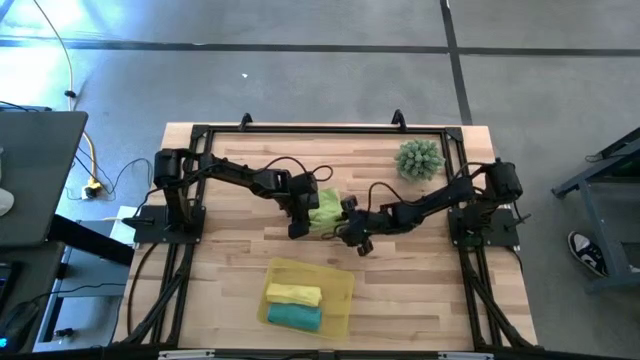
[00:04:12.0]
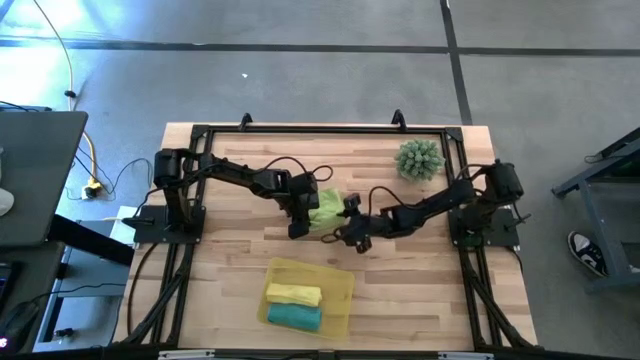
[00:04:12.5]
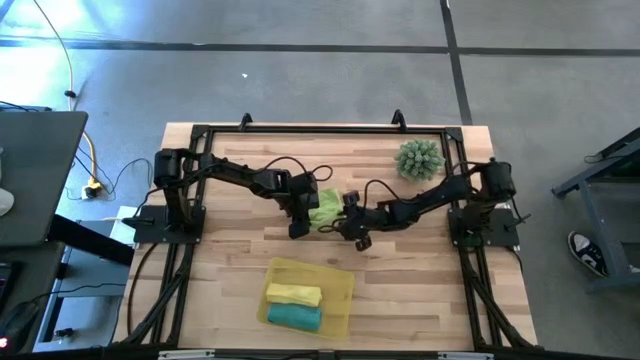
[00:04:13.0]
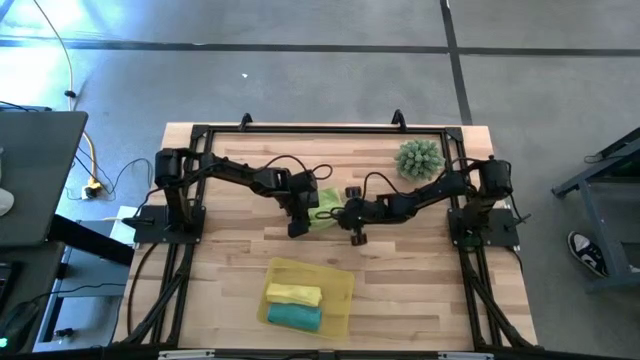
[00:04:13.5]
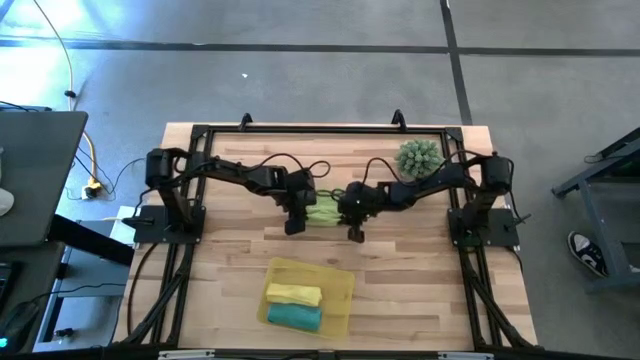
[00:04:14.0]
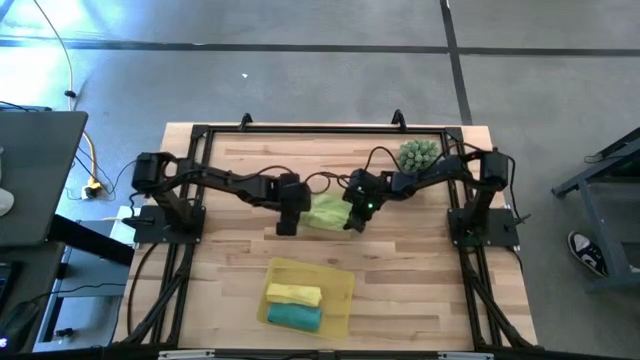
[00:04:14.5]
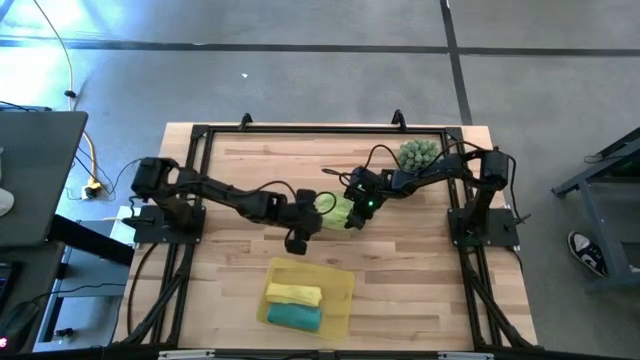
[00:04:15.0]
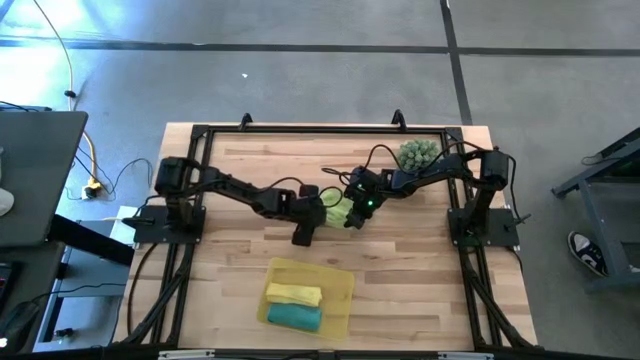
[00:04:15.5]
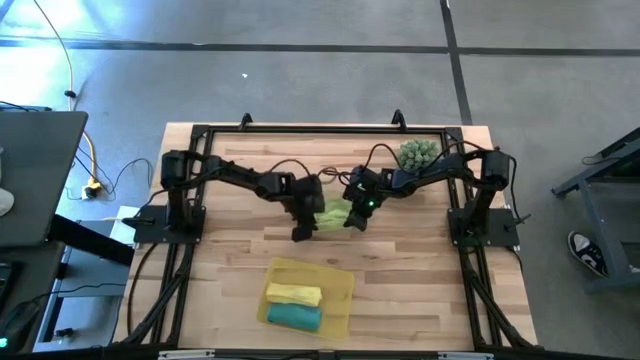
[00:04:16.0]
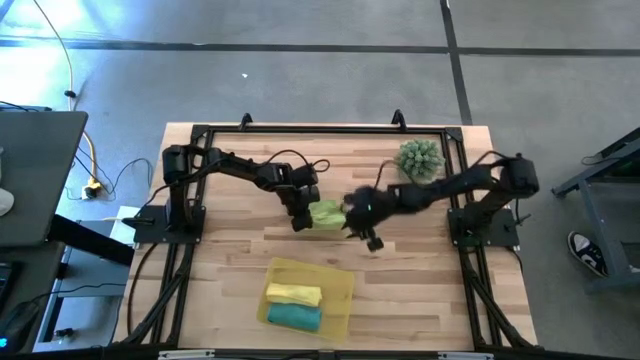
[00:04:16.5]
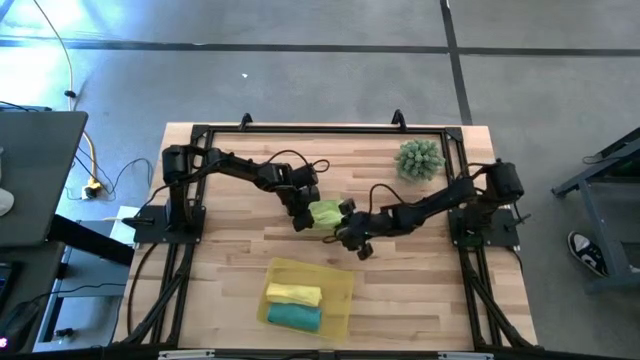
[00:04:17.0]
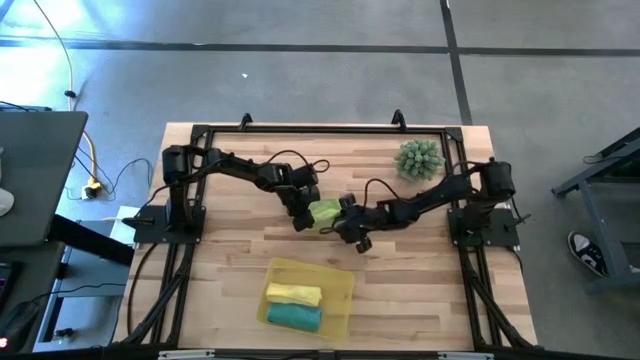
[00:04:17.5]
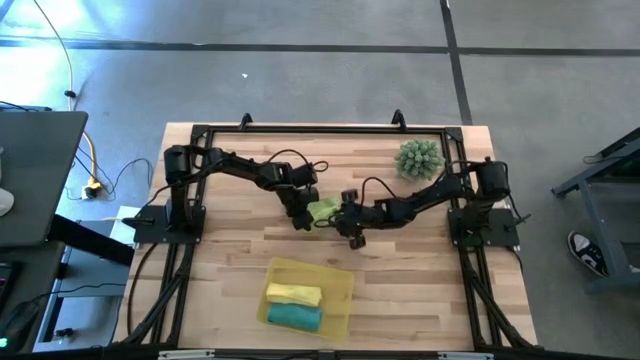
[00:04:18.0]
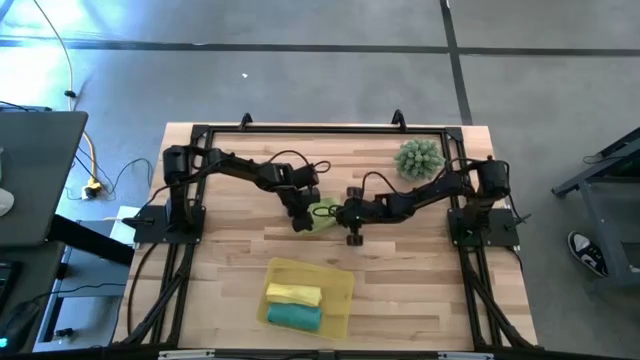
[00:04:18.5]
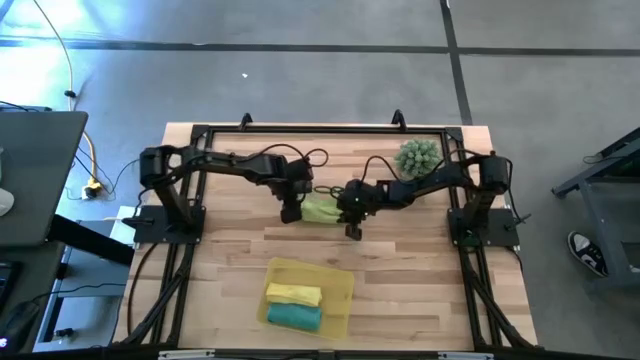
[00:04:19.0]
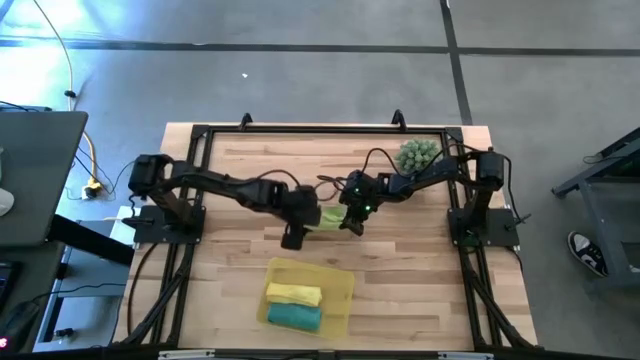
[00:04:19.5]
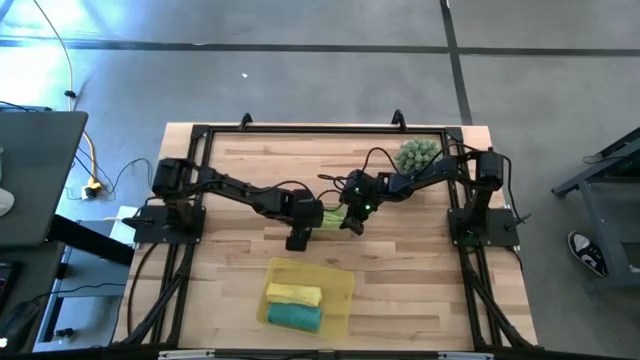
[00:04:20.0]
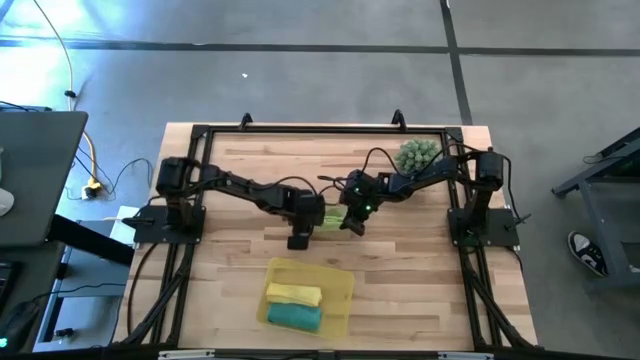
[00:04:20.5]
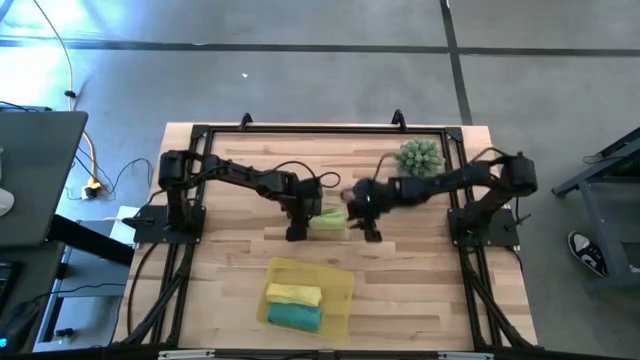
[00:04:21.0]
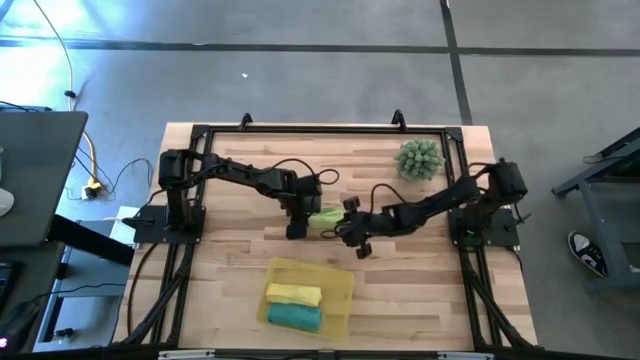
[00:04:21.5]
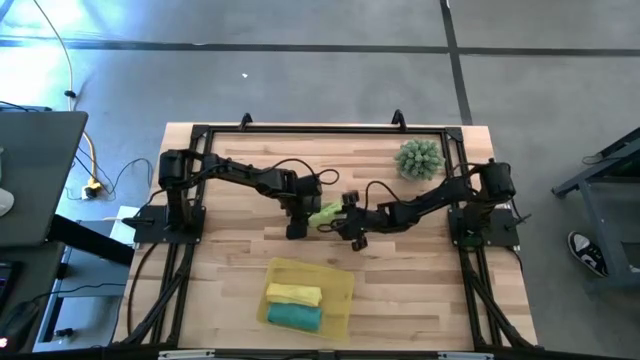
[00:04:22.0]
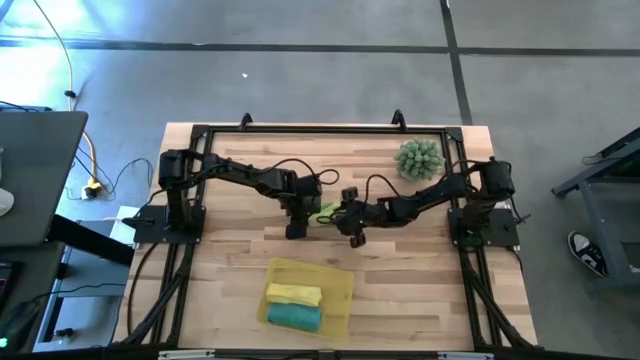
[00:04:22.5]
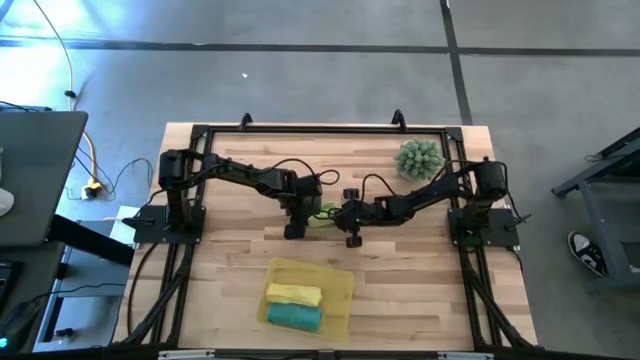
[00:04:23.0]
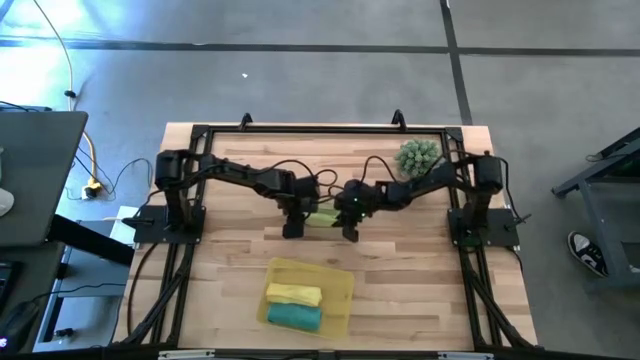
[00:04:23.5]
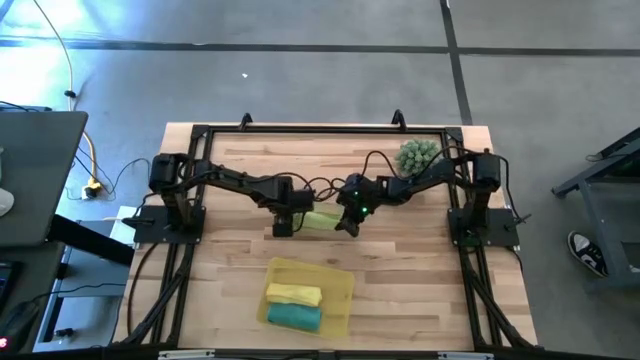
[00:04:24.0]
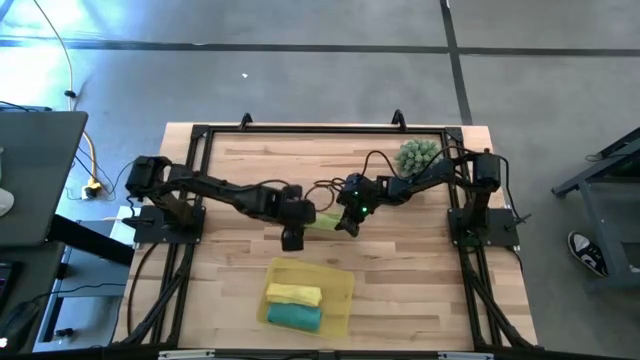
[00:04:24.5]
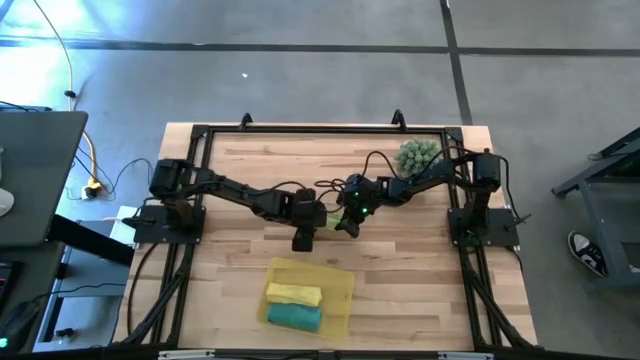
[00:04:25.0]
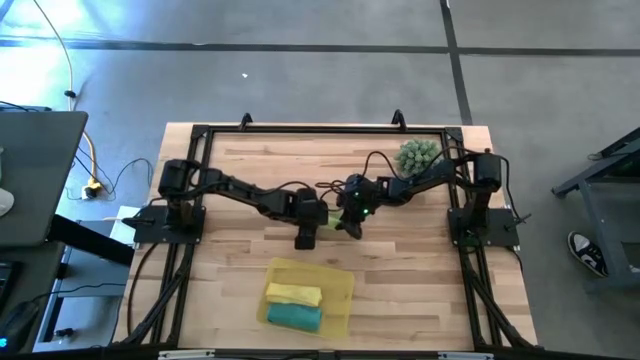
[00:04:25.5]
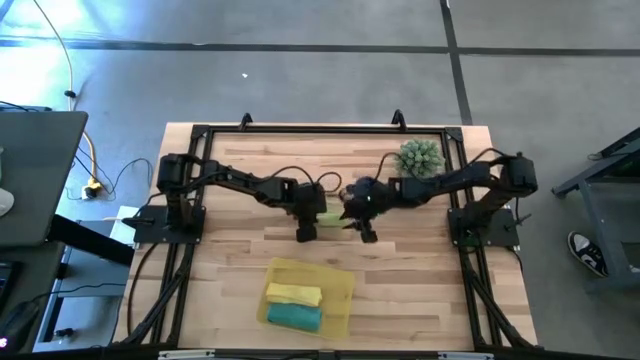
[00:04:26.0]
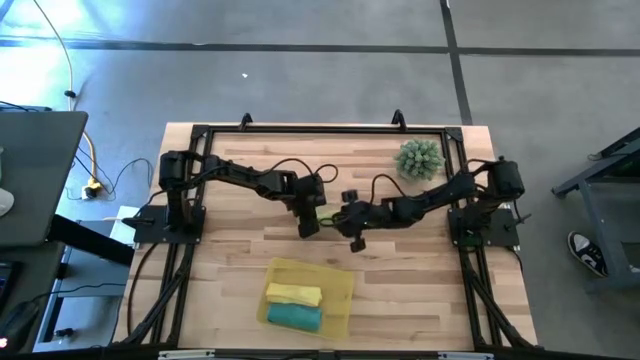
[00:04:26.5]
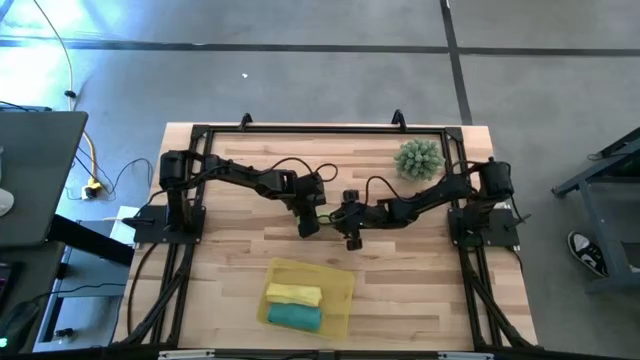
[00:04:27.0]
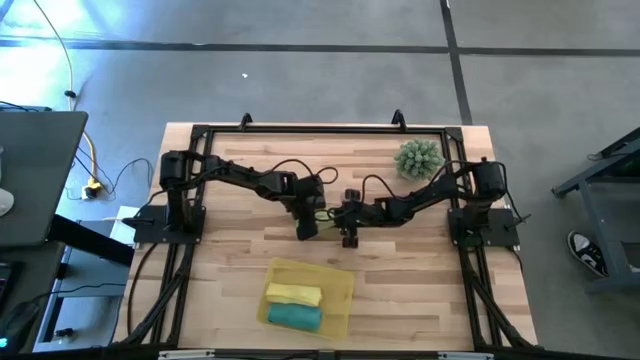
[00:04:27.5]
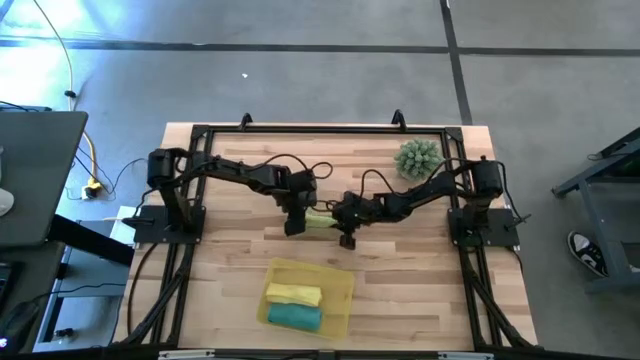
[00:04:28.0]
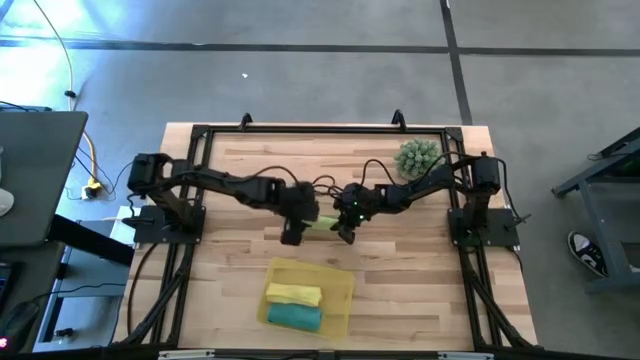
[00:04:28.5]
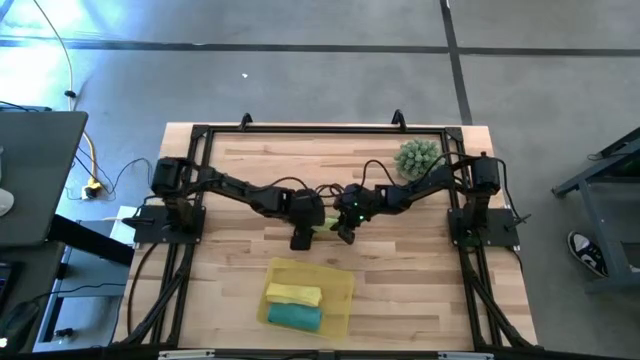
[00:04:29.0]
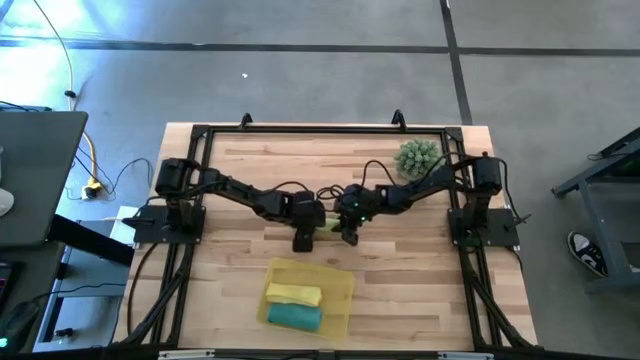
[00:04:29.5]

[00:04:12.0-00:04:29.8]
Task: Roll microfiber towels into tight, uniform cylinder then place into a basket
Roll the green towel

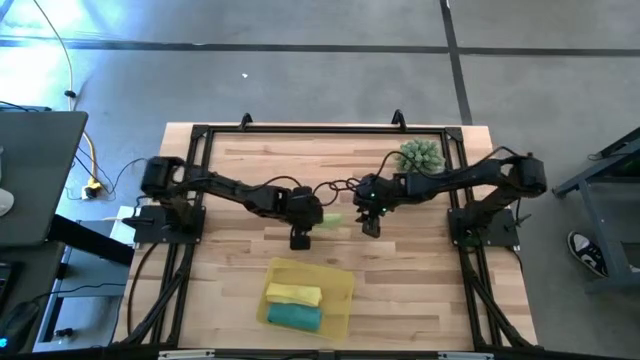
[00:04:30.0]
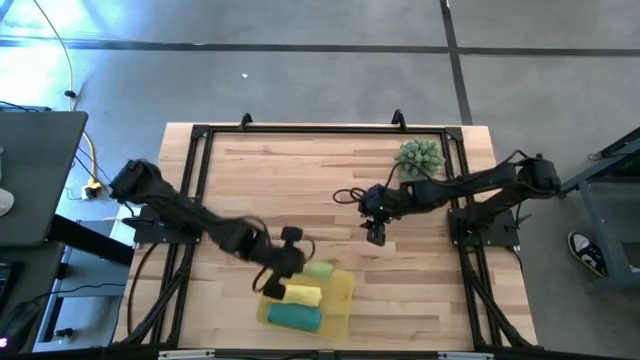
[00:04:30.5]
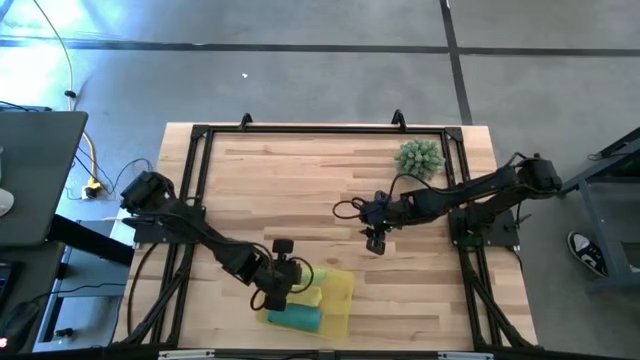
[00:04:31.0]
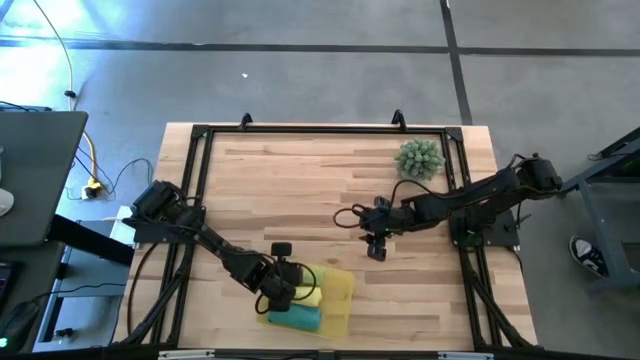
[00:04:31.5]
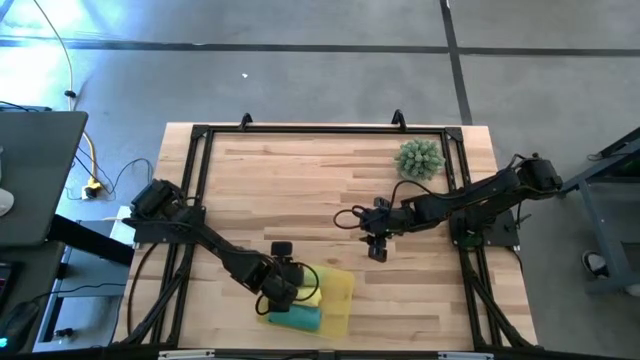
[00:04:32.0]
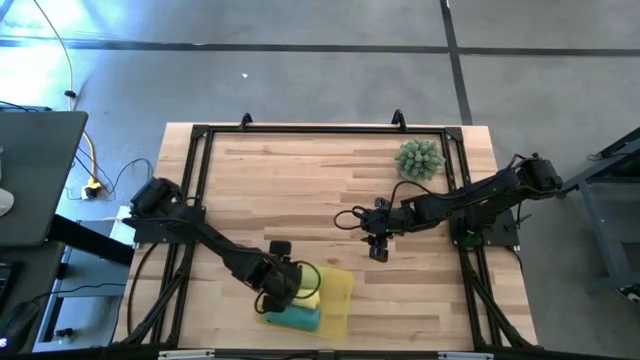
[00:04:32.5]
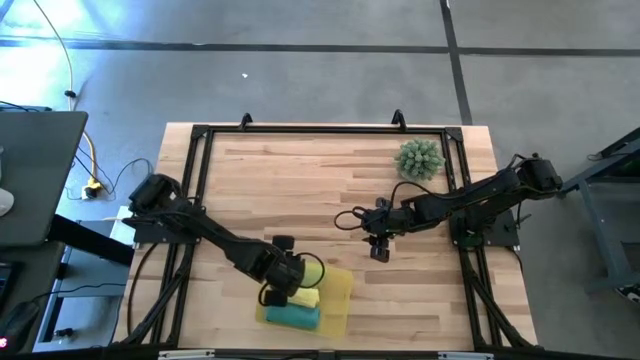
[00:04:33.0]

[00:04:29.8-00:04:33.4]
Put the rolled green towel into the yellow bin
